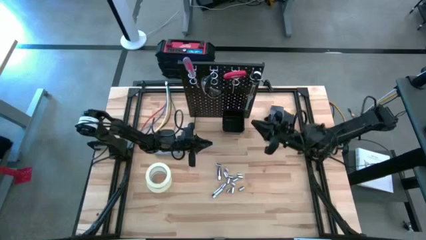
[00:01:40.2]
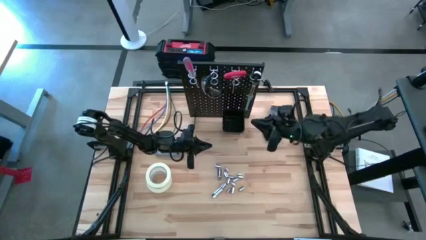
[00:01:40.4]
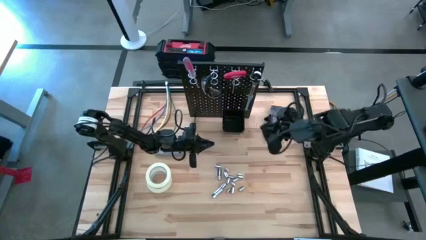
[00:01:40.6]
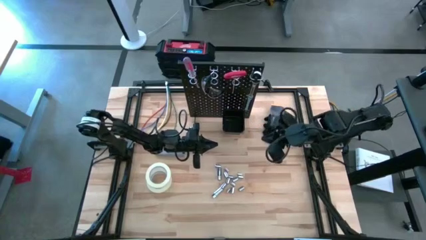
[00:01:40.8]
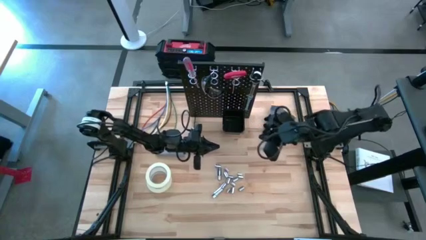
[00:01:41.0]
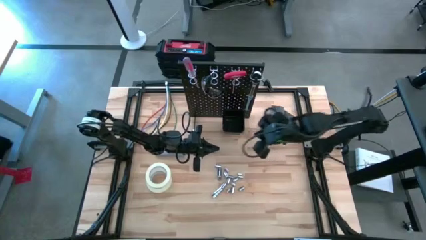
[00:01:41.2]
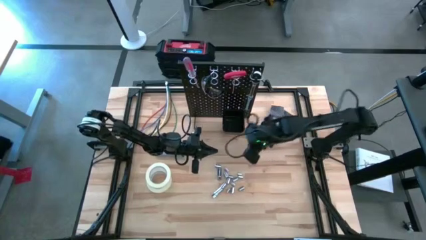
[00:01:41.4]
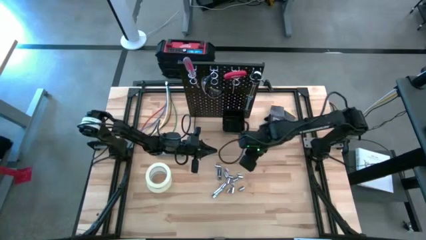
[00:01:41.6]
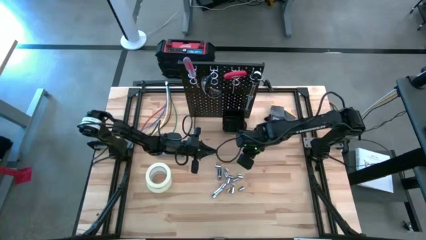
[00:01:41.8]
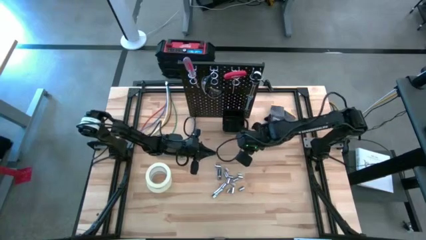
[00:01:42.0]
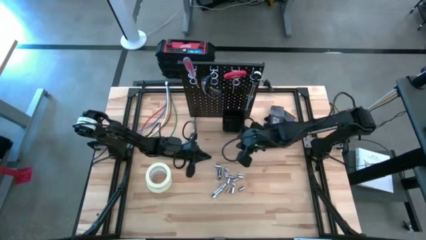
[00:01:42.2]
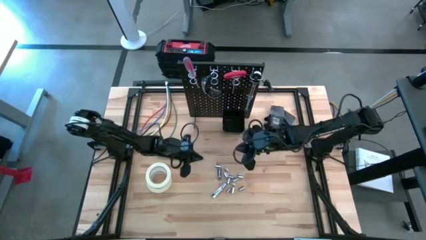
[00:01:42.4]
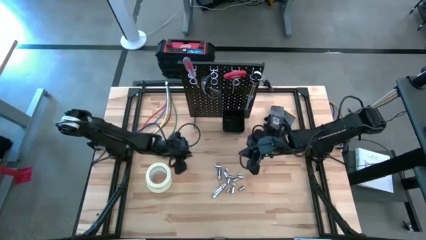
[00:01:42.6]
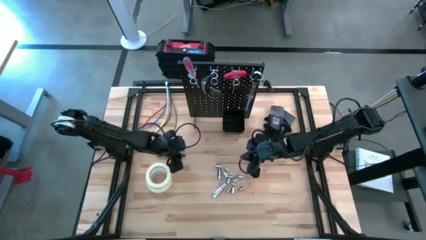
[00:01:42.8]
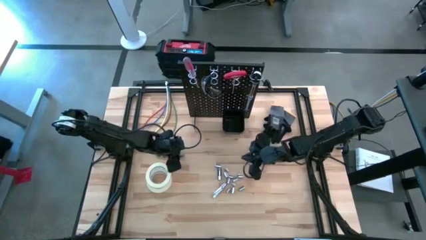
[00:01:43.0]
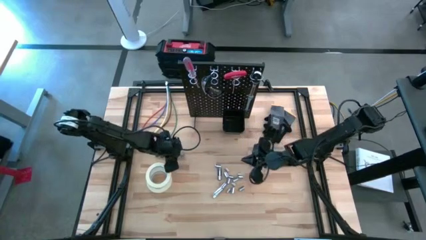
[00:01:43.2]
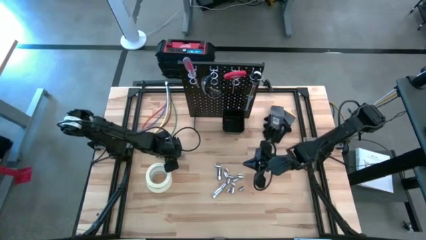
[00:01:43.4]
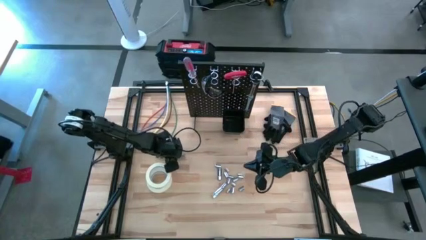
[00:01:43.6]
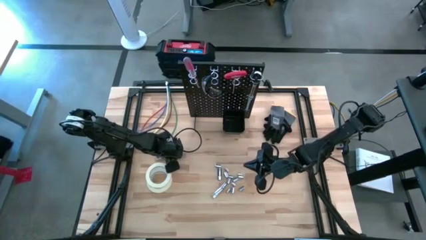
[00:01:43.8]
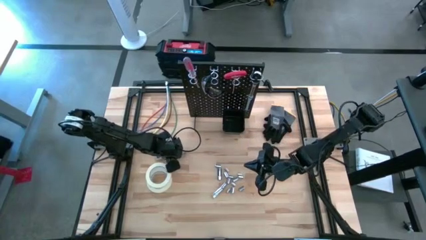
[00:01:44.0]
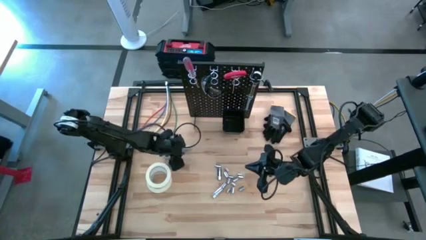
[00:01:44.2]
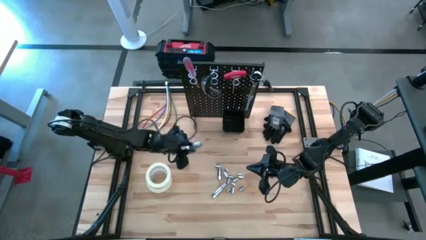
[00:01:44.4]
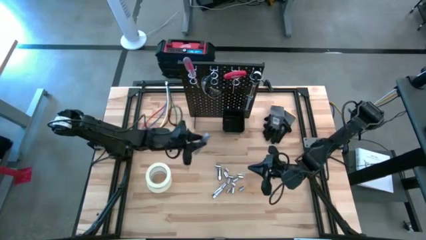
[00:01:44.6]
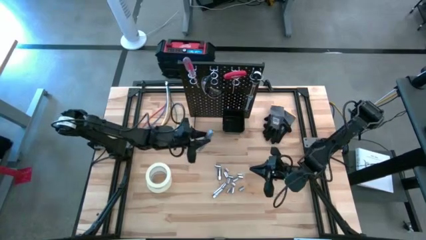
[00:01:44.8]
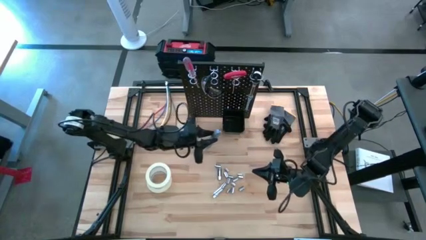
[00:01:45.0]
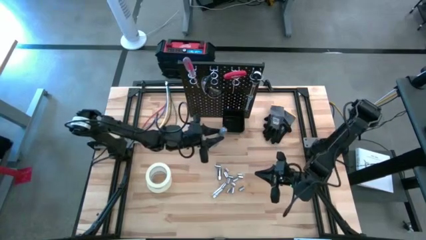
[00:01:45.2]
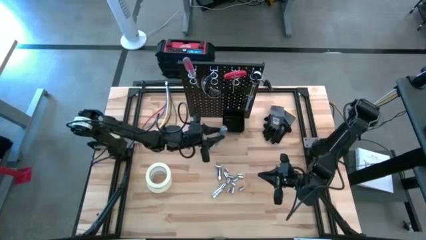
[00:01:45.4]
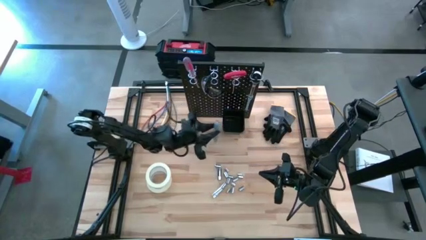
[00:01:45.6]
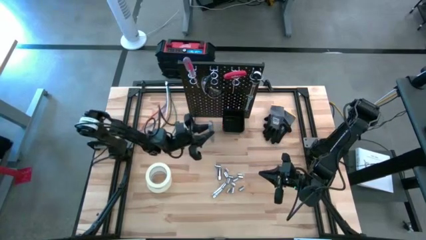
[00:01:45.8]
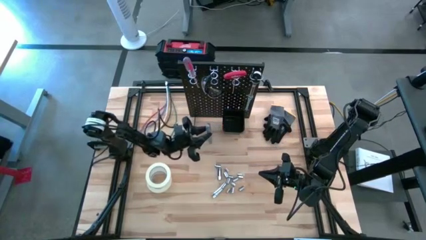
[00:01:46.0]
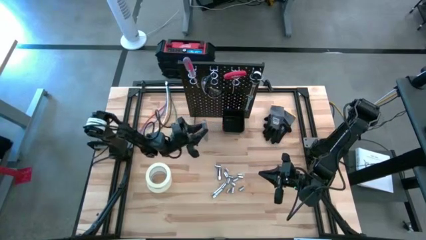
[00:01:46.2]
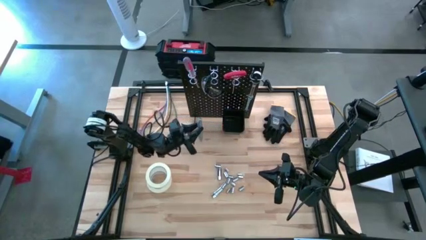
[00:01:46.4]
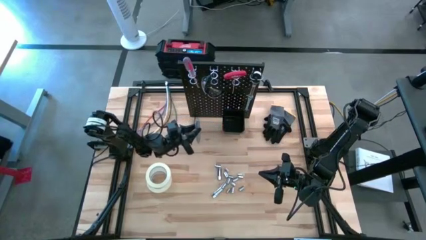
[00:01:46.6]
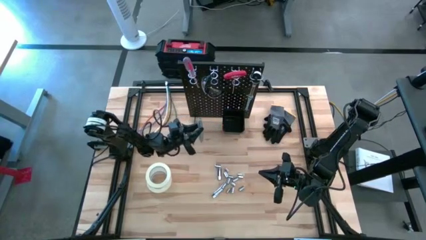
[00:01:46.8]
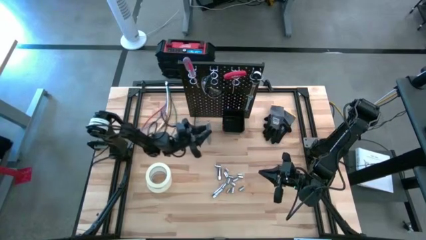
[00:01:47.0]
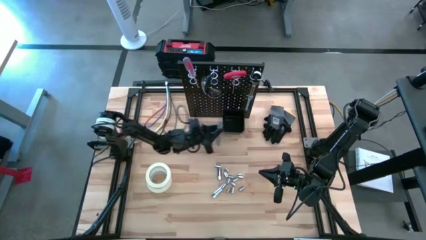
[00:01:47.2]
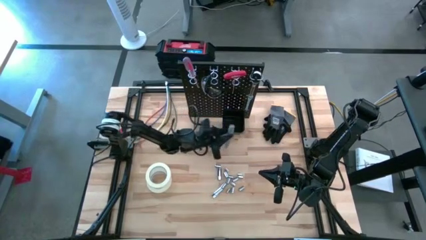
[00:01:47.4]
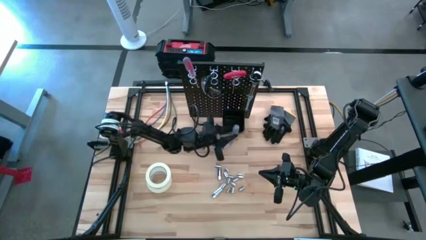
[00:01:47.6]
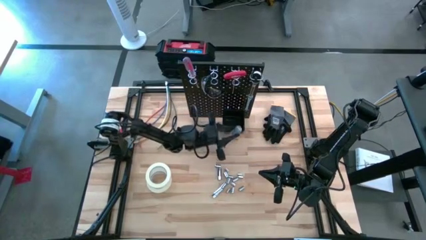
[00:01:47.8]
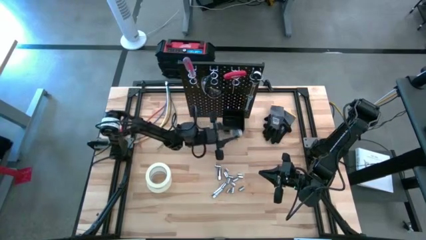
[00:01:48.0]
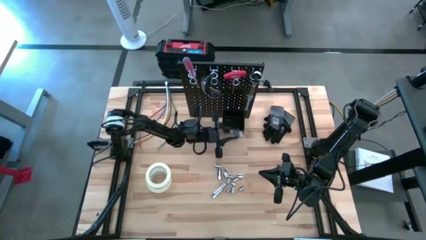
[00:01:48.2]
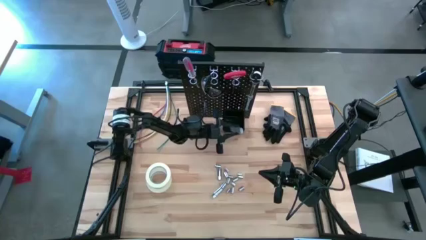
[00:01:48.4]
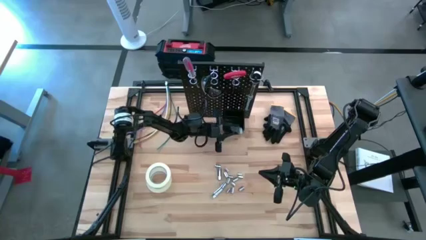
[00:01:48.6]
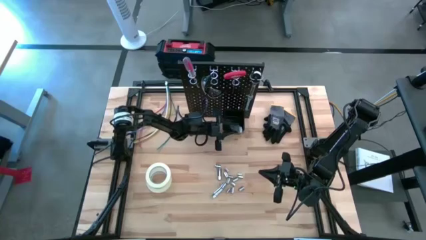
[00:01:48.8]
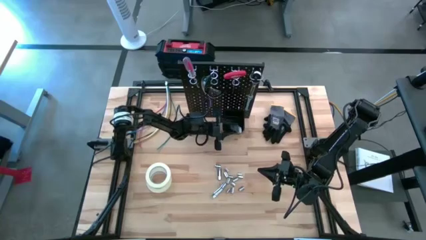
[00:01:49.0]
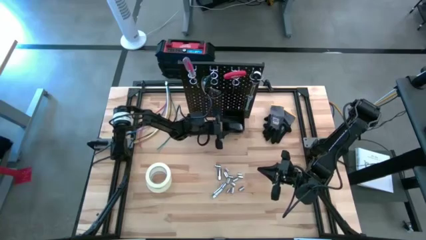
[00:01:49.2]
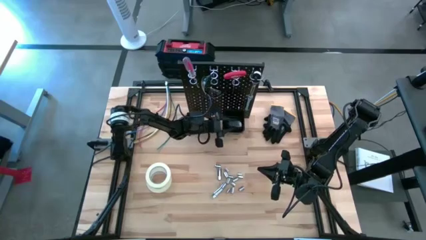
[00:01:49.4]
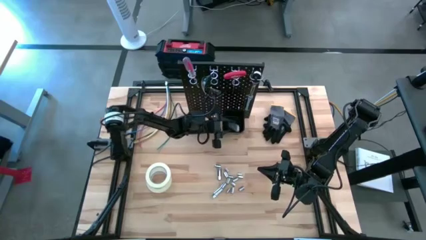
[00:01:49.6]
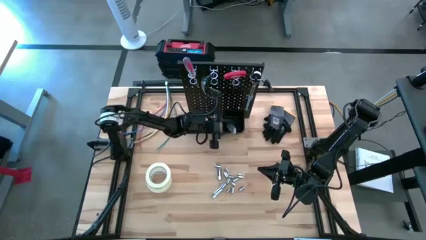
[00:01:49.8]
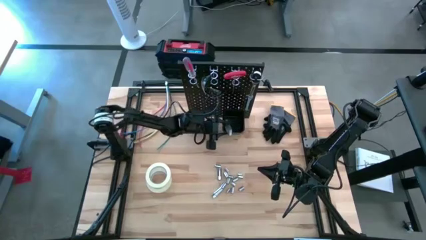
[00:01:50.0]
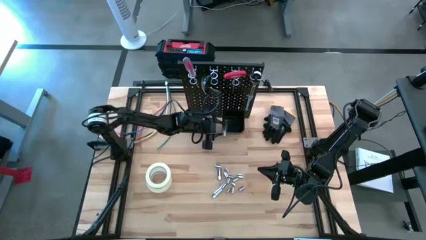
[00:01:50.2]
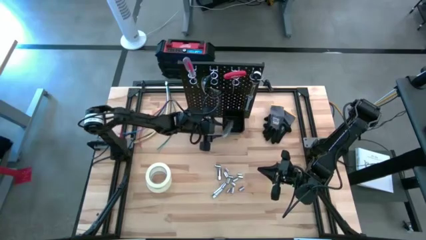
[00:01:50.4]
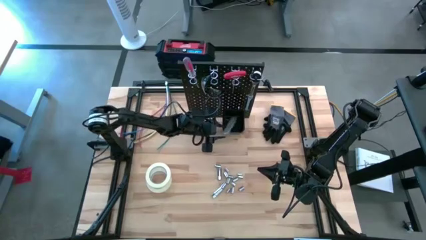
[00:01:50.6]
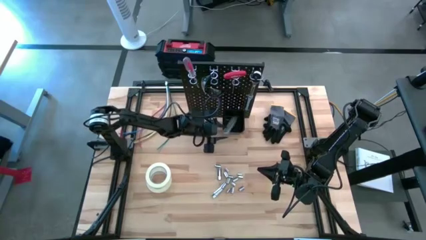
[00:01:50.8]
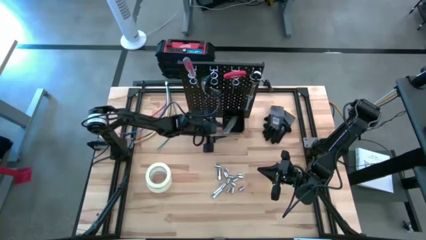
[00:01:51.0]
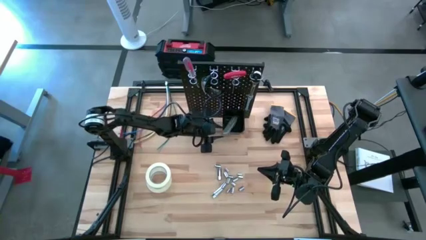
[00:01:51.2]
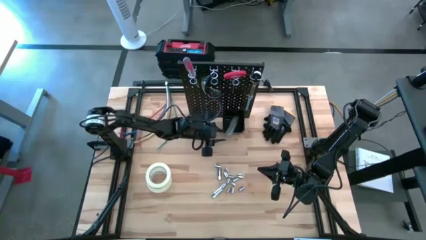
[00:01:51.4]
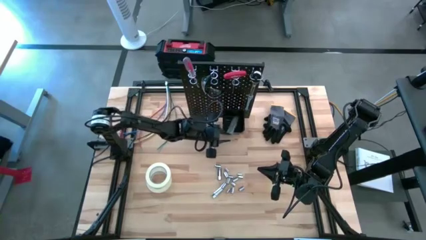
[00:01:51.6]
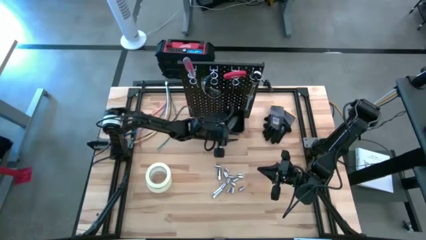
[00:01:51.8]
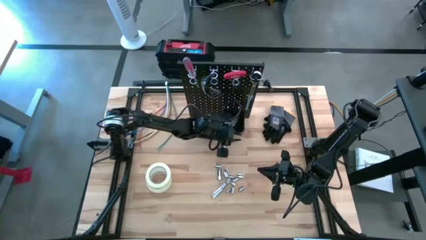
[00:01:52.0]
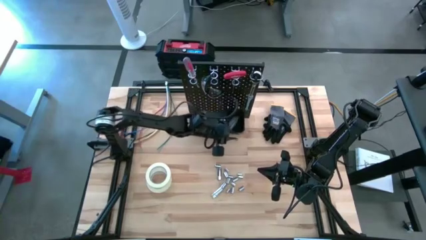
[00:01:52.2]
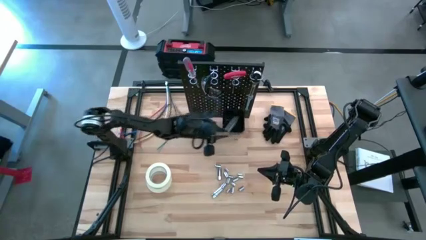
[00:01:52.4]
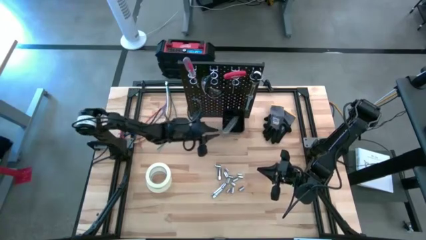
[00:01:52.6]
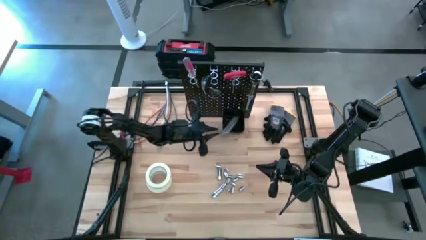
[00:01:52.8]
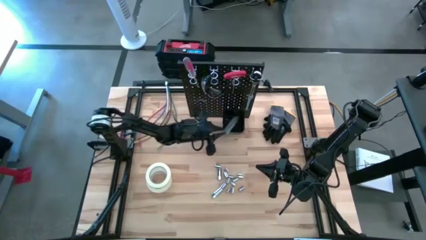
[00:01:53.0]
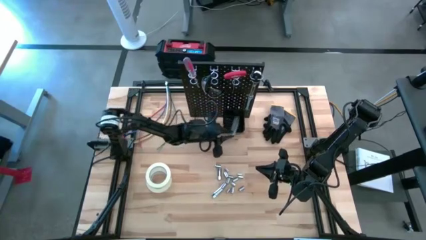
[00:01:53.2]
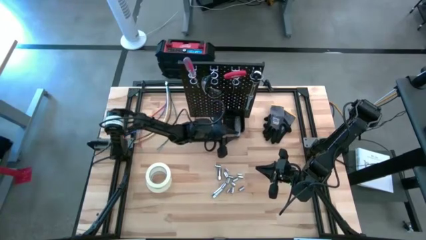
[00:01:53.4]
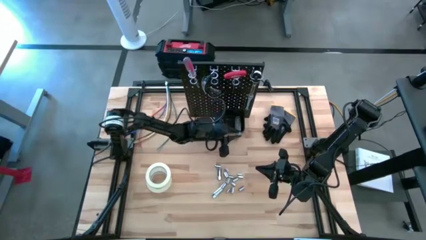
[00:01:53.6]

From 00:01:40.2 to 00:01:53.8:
Task: Hang tools onto peg board
Put the cutter into the black bin on the peg board

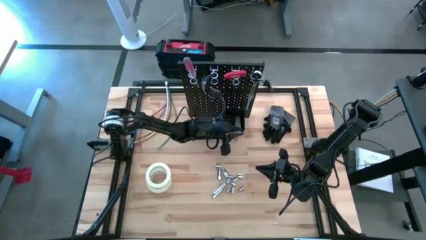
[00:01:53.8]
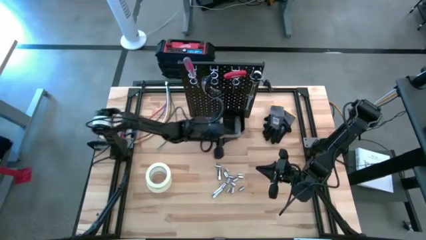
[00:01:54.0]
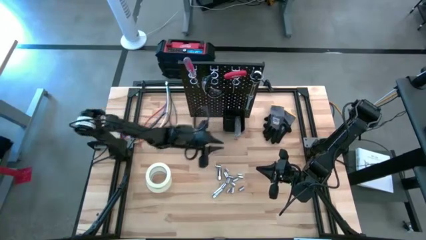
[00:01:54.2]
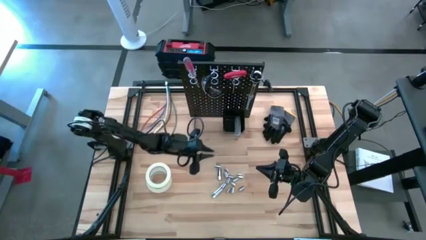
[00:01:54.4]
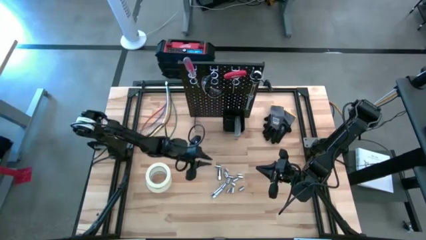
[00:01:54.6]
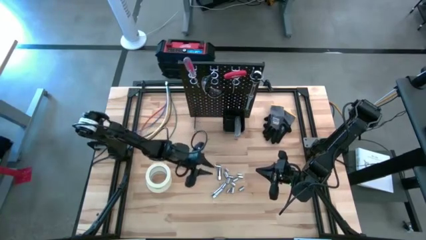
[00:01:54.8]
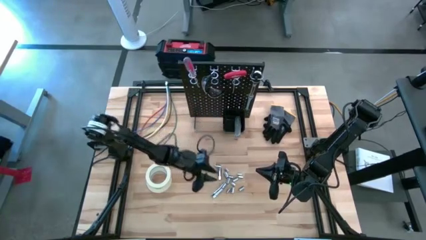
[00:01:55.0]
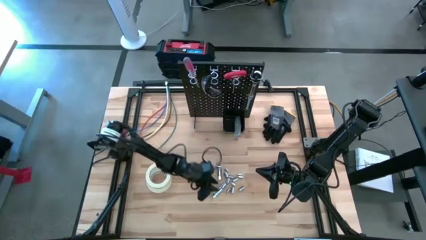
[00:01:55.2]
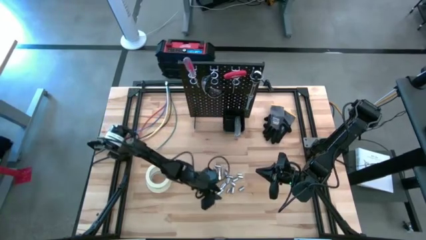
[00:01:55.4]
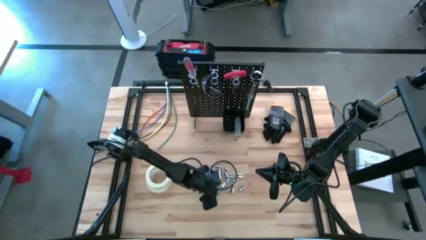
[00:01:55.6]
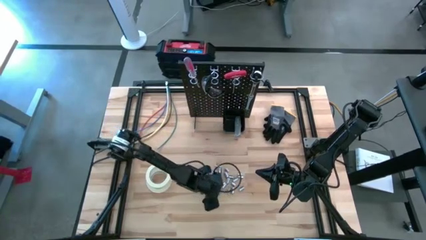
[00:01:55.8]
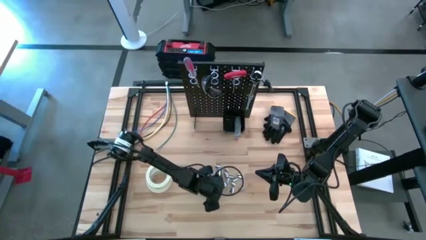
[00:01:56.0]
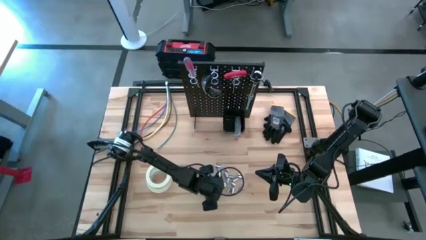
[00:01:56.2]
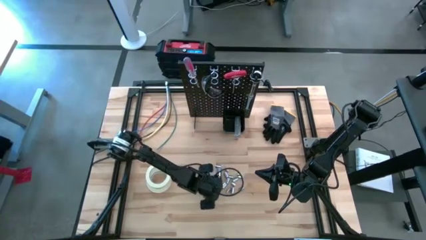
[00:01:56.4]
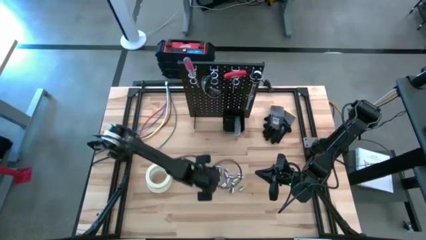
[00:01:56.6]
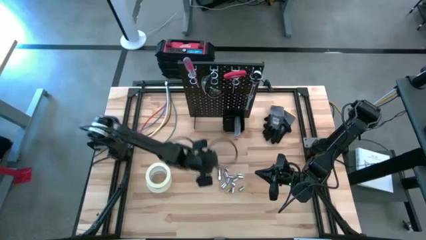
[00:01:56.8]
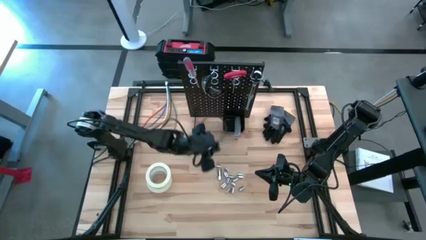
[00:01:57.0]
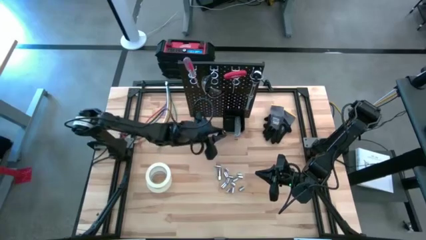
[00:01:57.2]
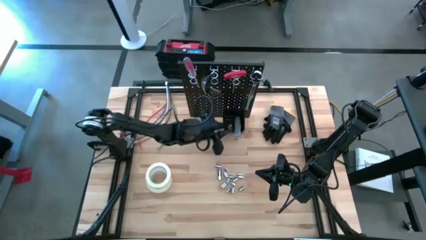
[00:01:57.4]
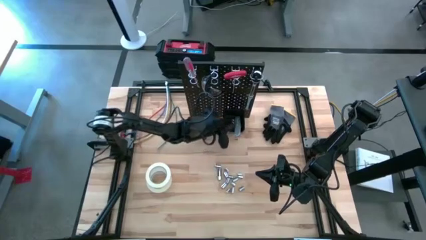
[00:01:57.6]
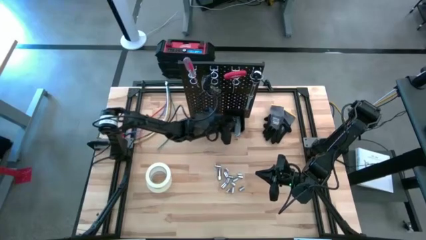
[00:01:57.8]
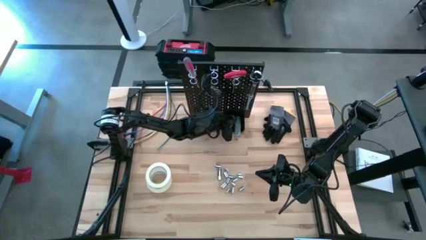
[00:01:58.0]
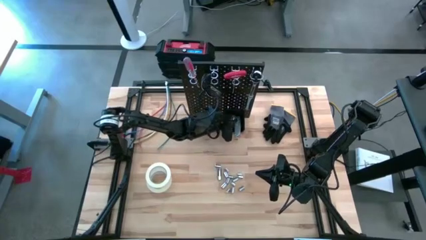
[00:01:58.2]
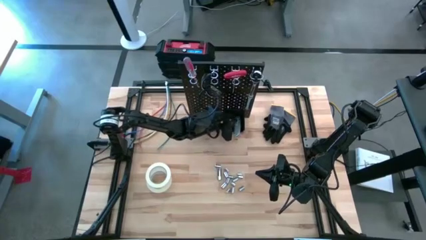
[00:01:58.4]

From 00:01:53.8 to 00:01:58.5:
Put the bottom extension bar into the black bin on the peg board
